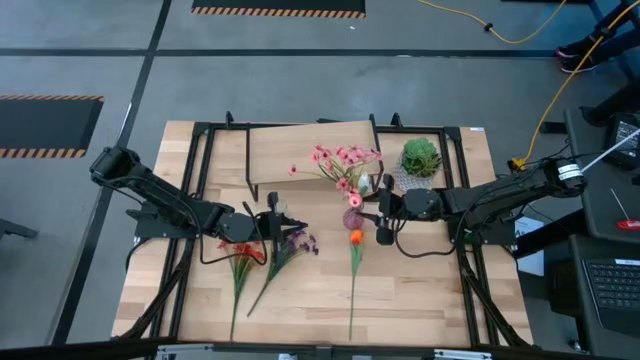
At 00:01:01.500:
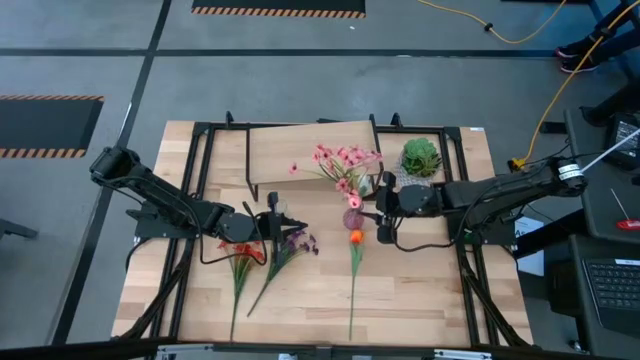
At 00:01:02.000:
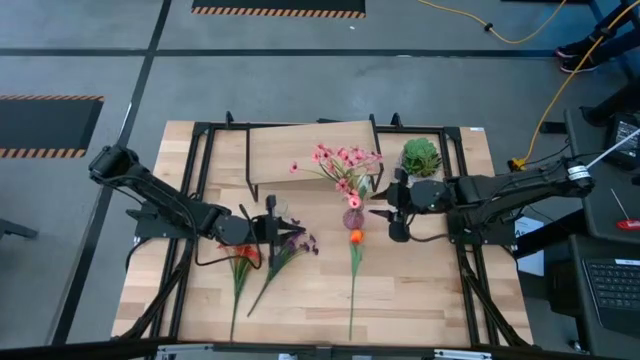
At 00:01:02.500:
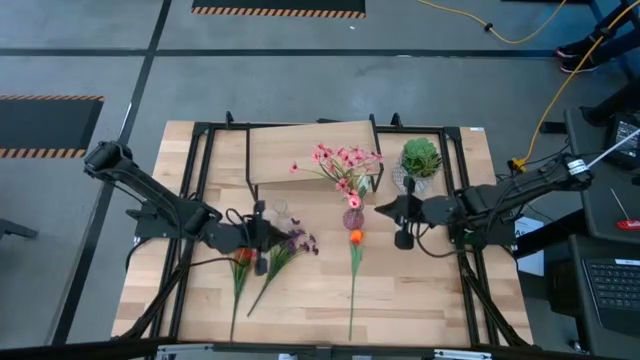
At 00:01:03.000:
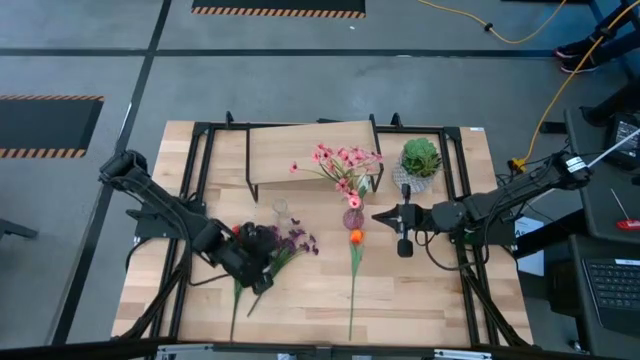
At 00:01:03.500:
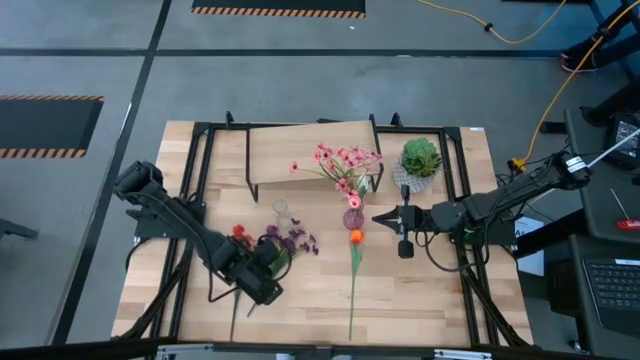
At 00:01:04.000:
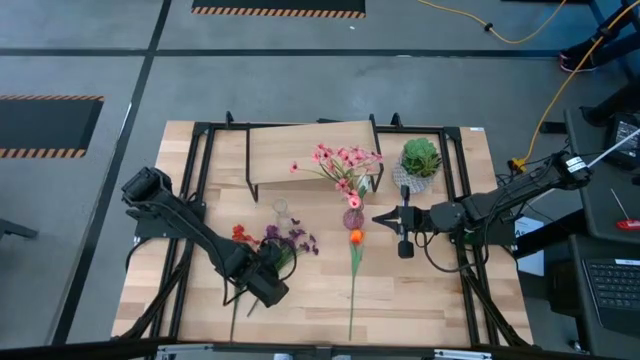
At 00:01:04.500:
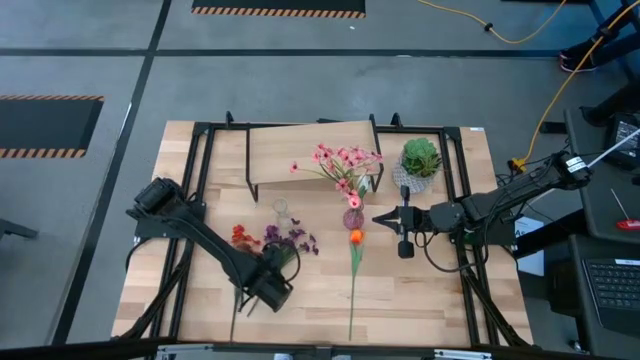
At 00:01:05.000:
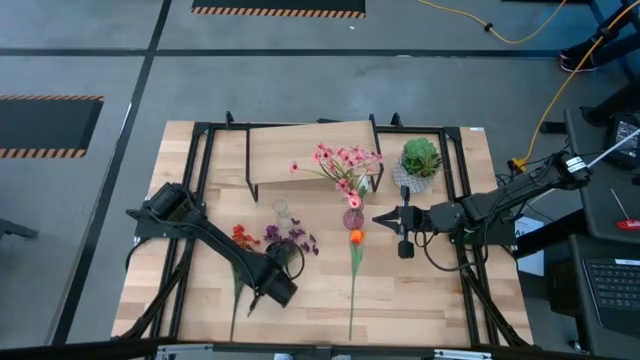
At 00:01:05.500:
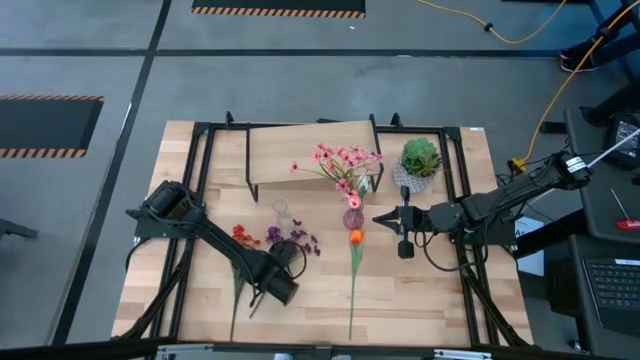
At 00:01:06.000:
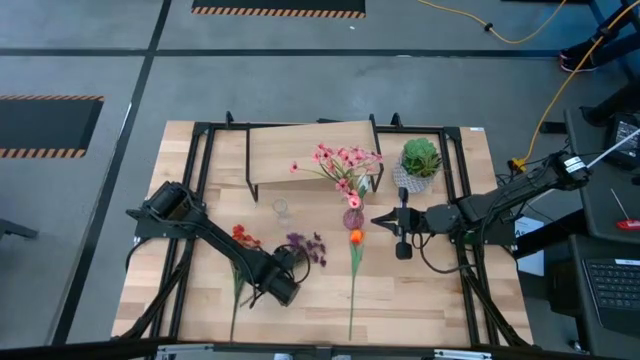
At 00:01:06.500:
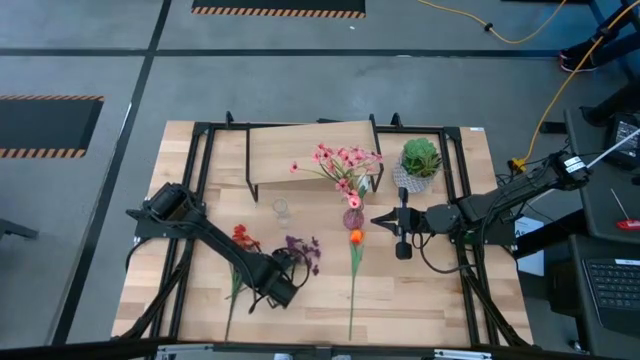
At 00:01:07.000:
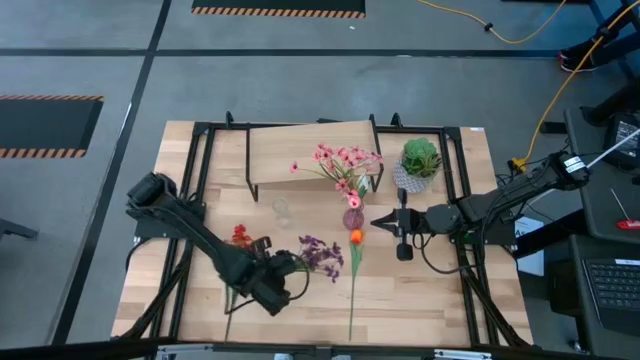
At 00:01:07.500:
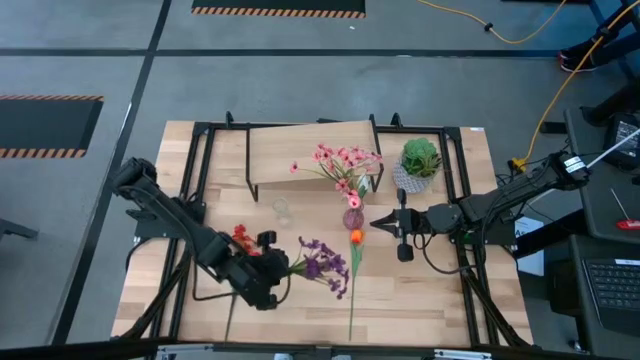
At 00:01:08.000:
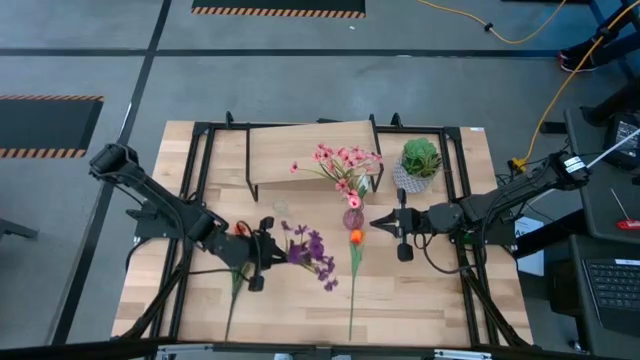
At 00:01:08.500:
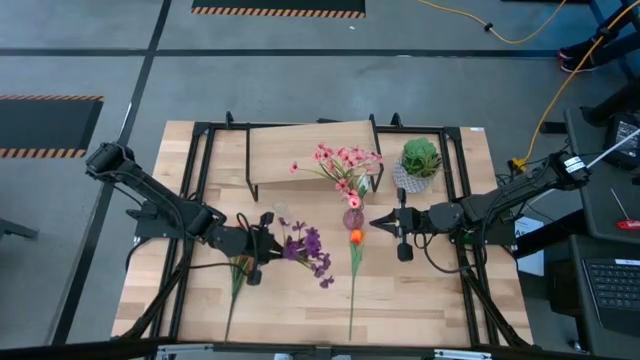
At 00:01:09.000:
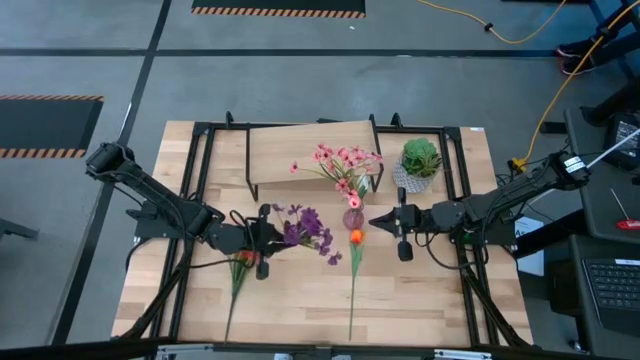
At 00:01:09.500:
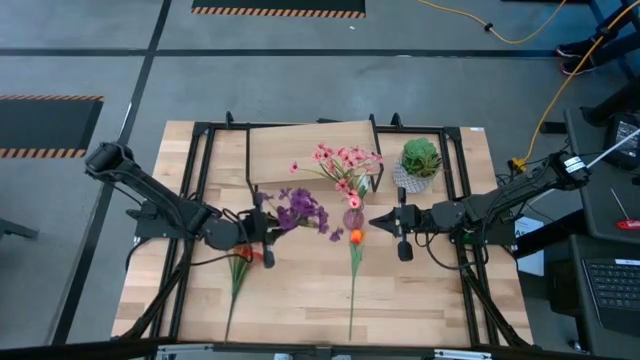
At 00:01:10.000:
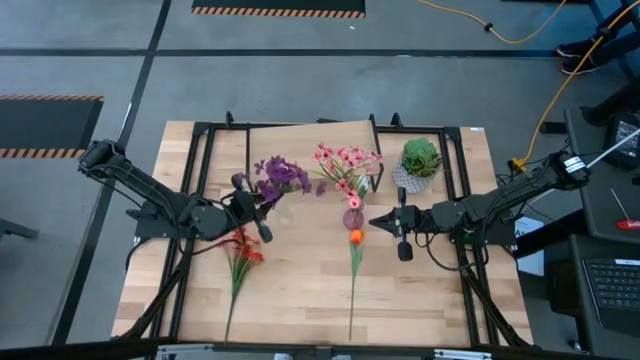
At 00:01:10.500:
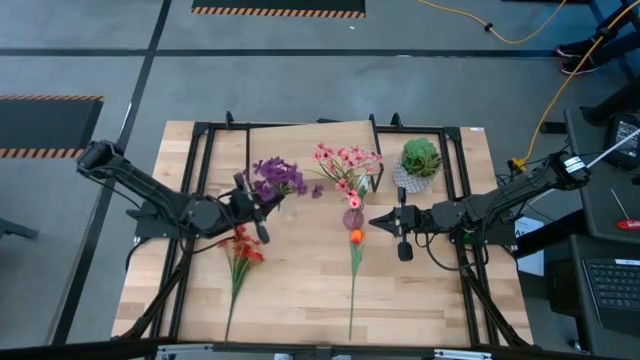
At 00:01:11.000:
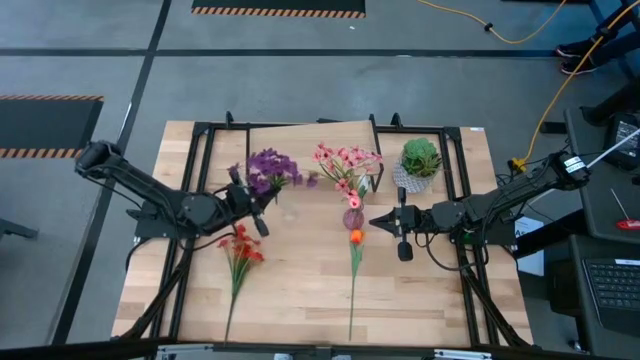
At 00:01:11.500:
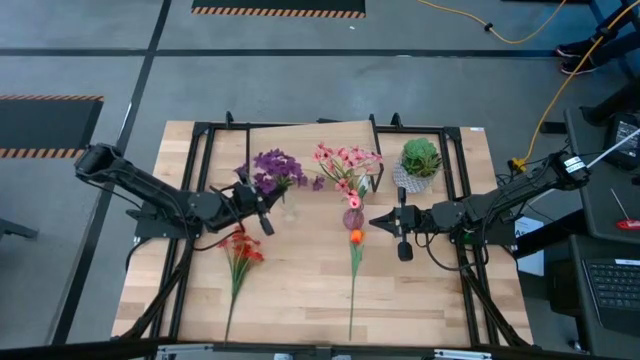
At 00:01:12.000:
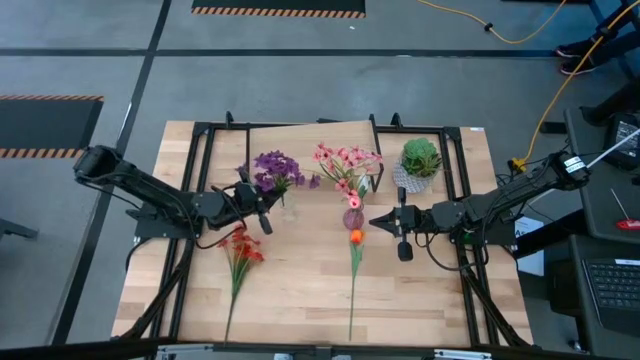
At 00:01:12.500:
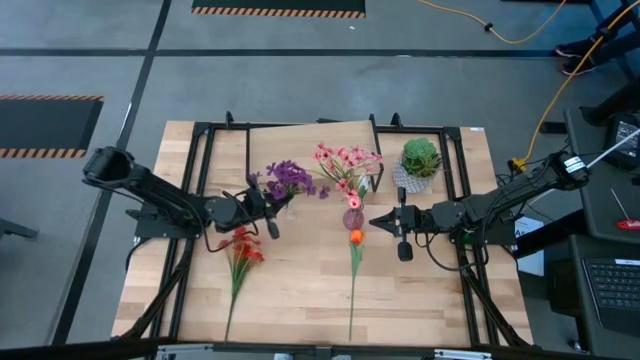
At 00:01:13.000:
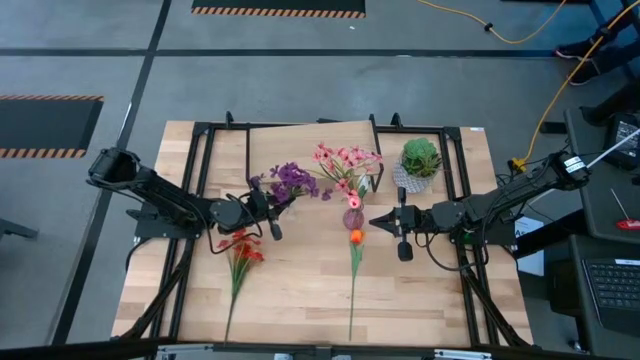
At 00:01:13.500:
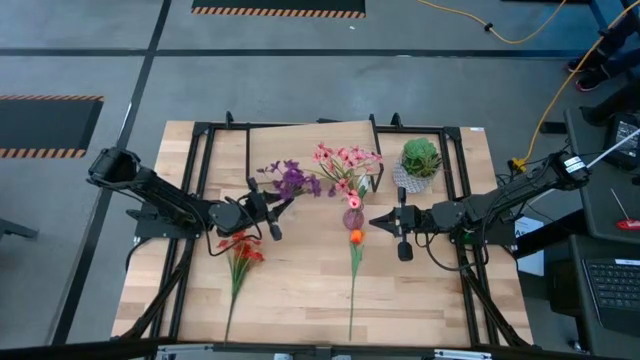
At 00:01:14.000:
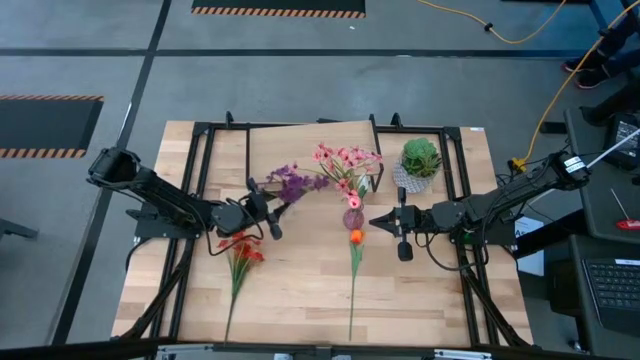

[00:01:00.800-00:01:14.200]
Task: Pick and place flowers into a vace then onto a shelf
Put the purple flowers into the transparent vase
